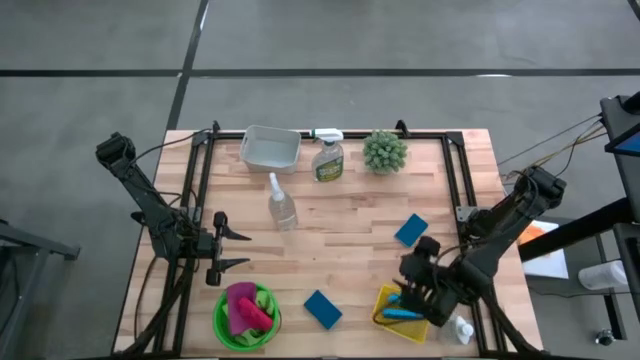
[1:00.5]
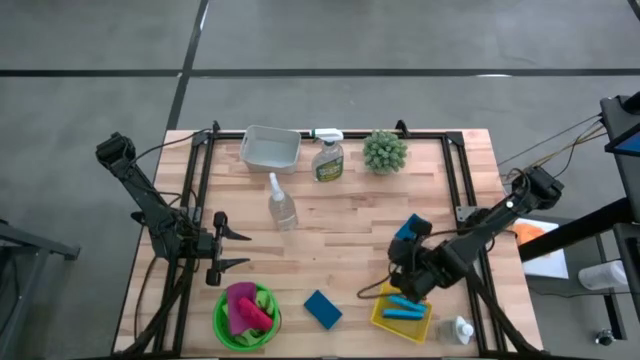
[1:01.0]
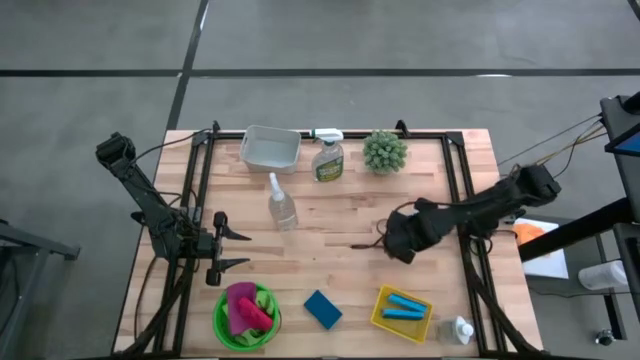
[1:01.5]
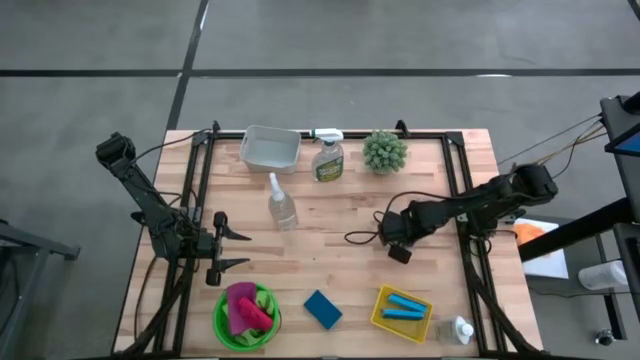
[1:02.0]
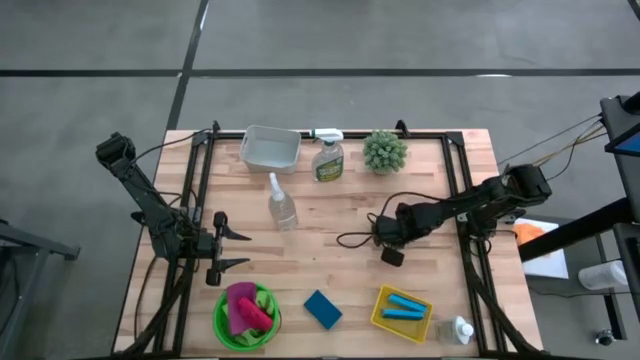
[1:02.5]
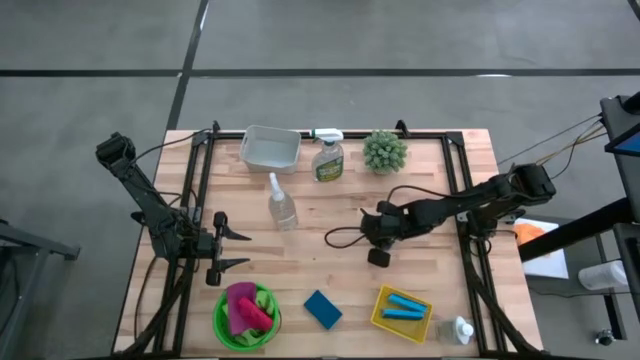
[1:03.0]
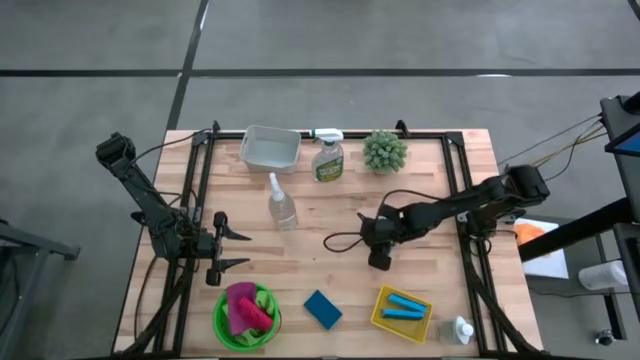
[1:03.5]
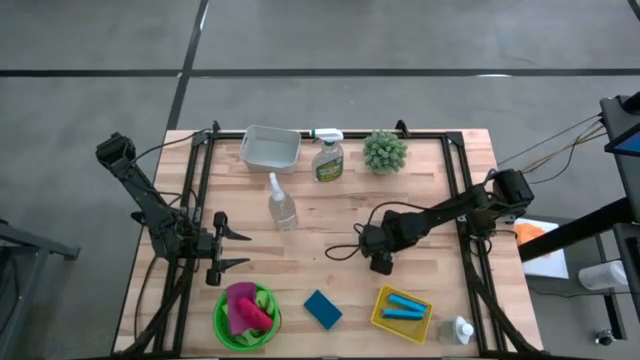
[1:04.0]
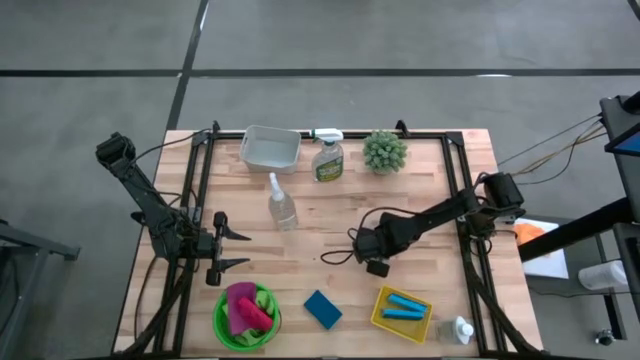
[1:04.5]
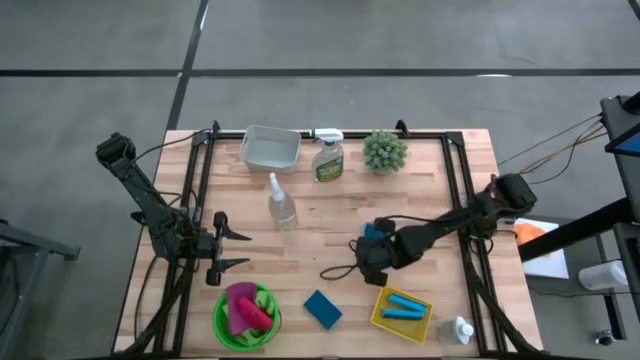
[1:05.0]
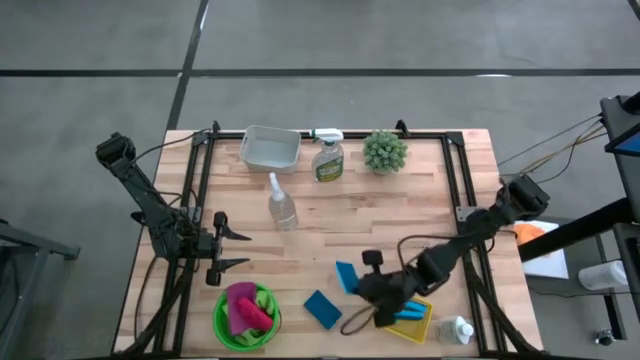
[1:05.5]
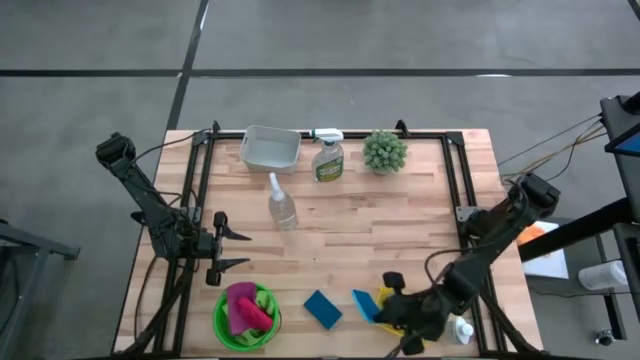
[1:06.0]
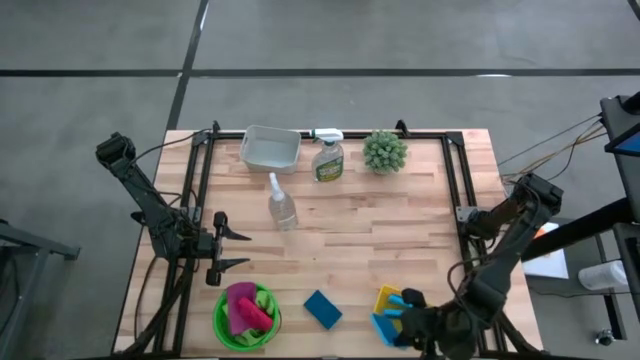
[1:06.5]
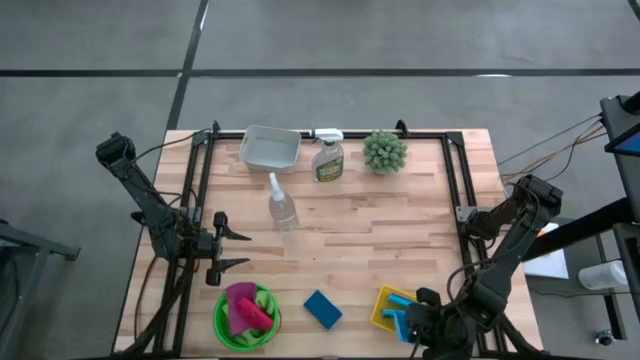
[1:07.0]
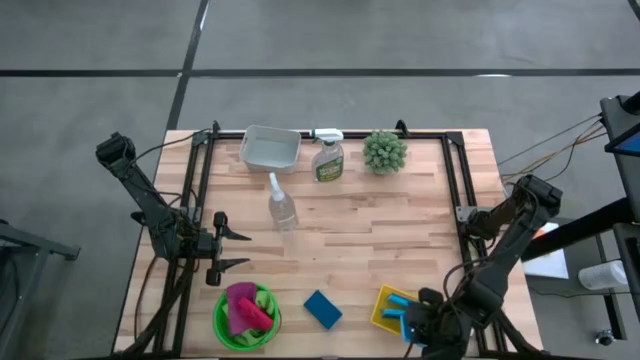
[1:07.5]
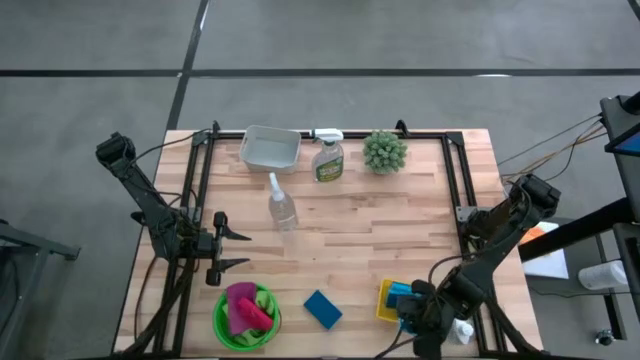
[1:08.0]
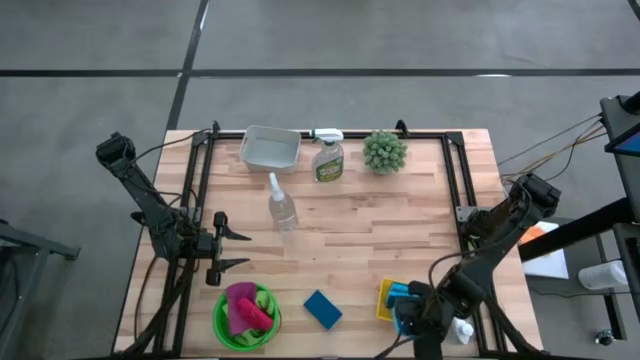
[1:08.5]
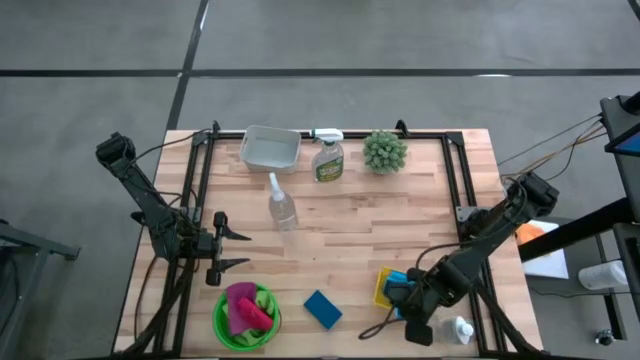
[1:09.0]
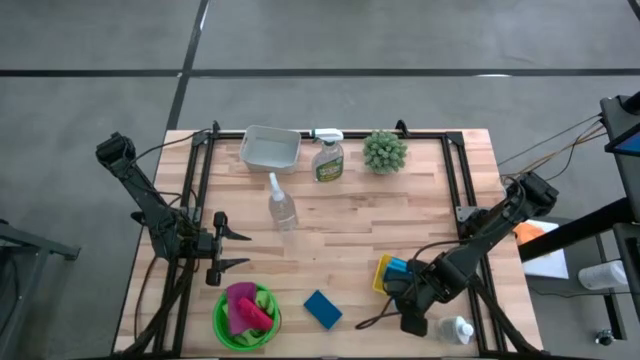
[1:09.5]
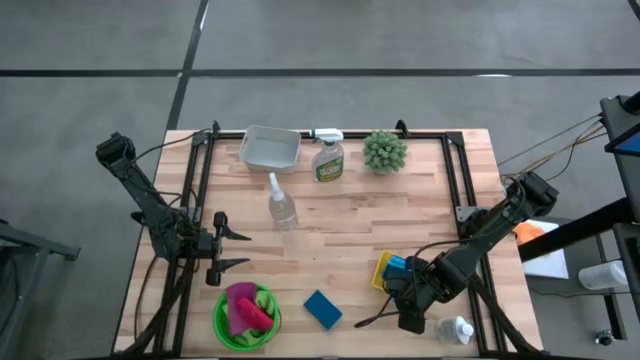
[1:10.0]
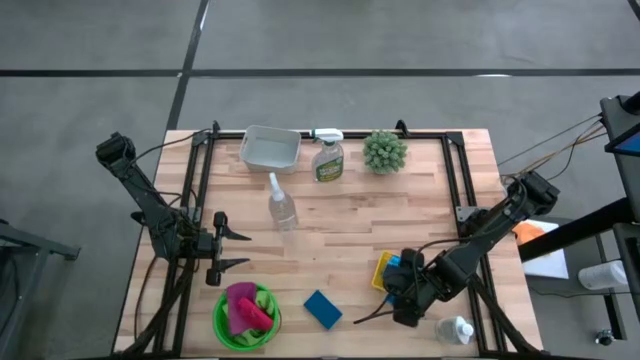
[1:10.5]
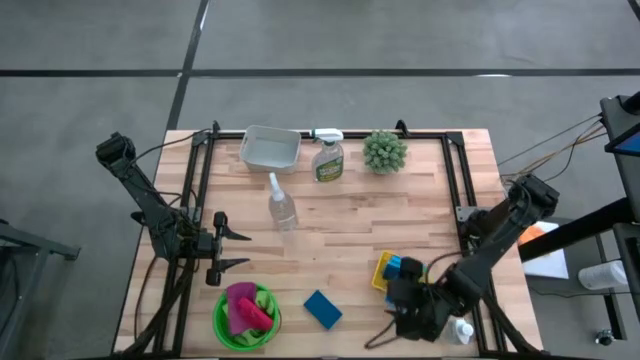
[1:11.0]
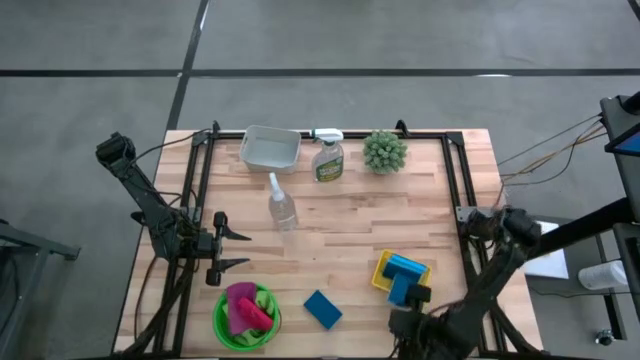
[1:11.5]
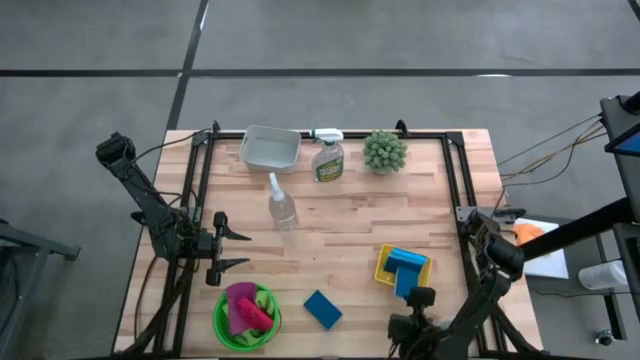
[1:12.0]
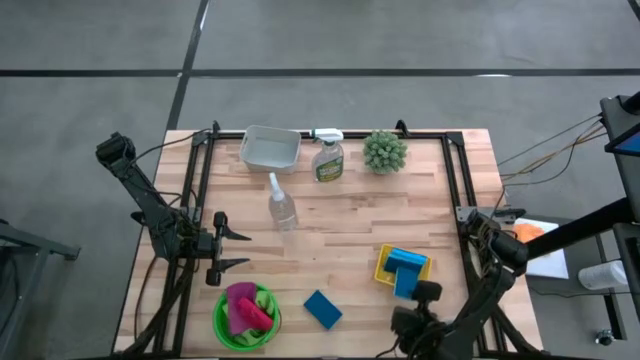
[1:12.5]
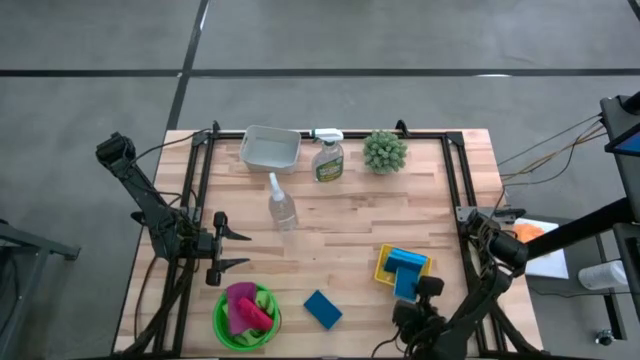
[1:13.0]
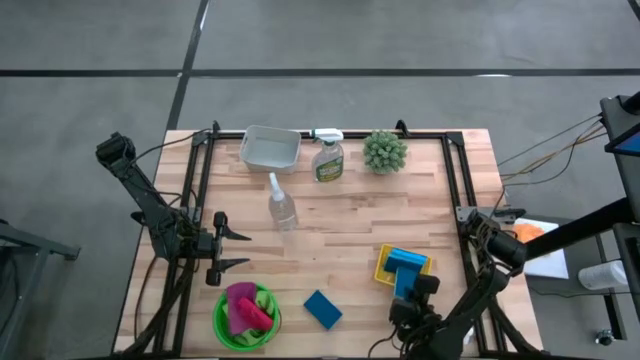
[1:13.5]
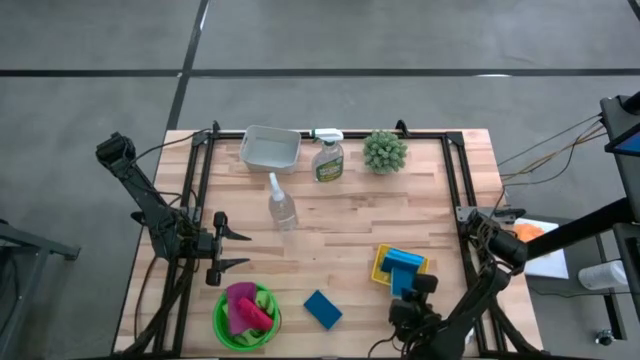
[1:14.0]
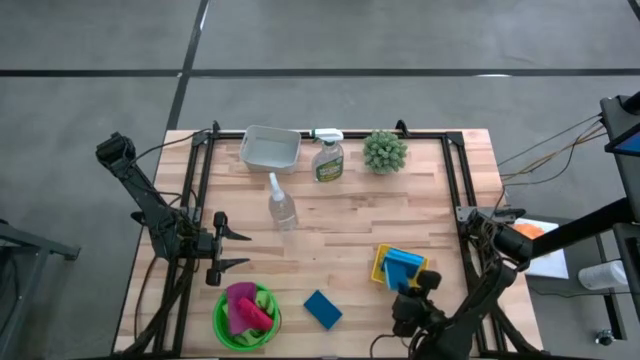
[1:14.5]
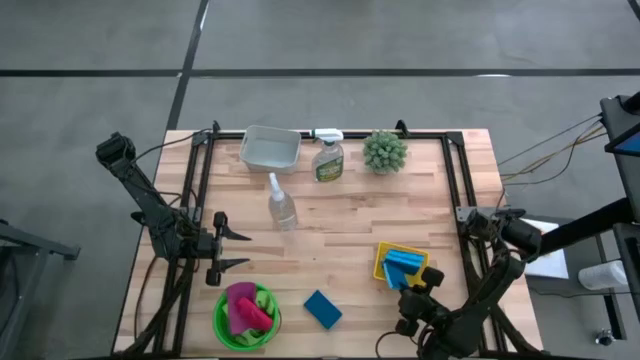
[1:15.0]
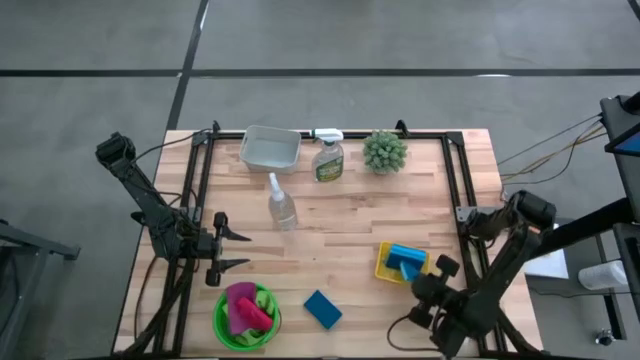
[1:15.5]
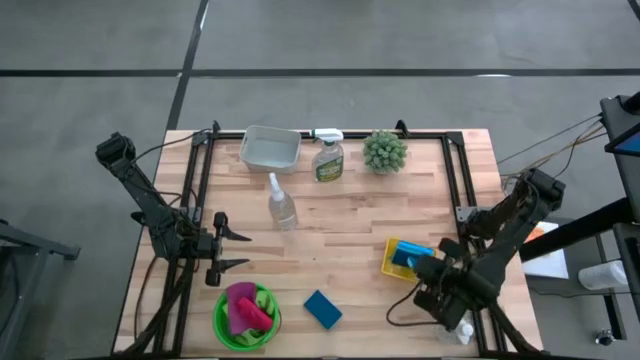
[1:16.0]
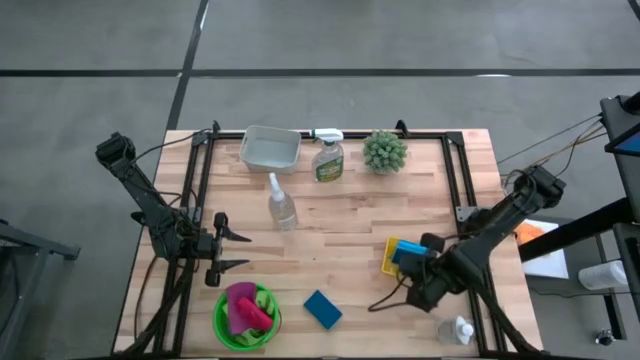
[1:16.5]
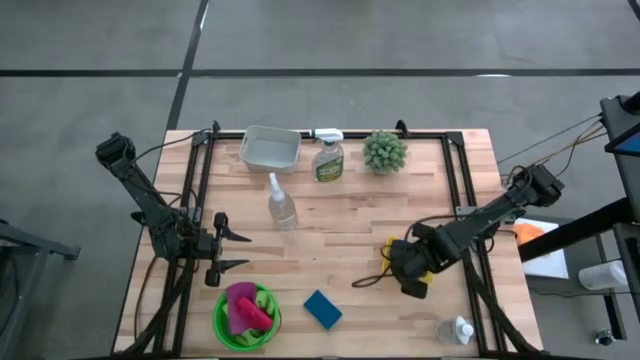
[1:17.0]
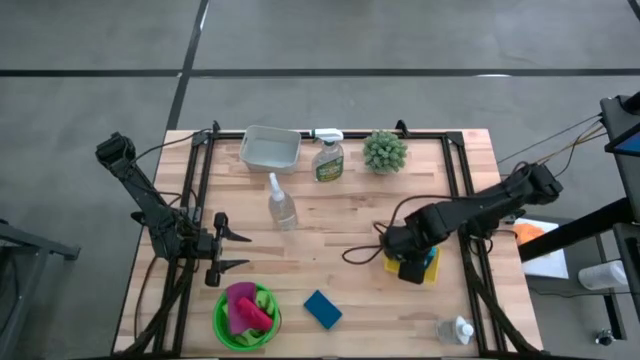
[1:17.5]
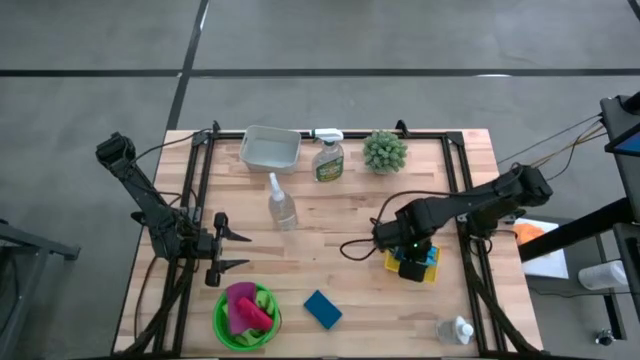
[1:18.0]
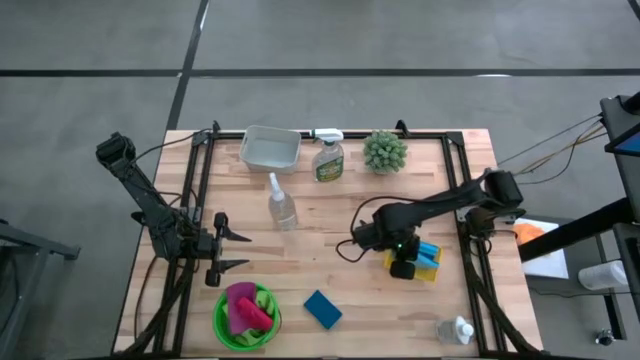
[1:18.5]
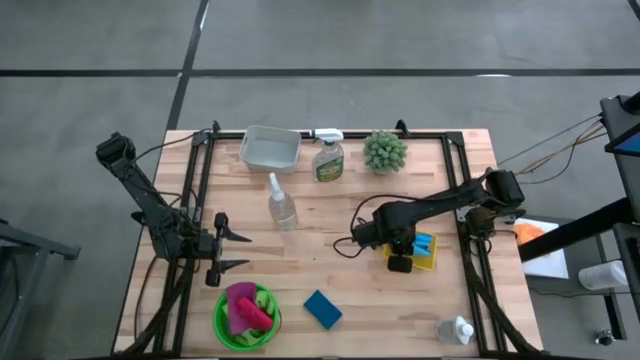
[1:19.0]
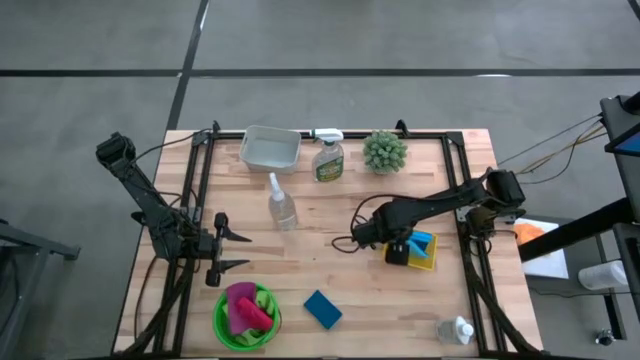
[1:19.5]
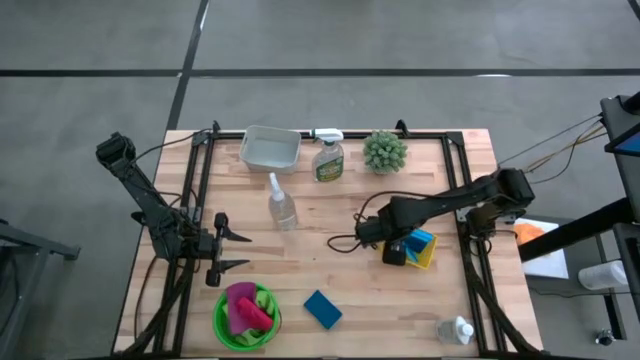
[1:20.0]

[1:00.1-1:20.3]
Task: Pick & Place Kitchen Items
Put the blue sponge into the yellow bin
